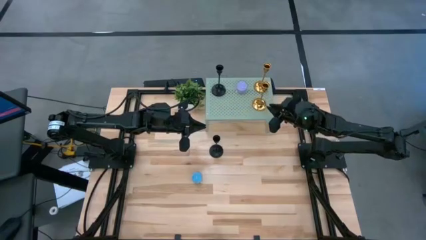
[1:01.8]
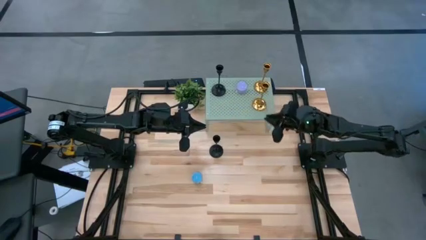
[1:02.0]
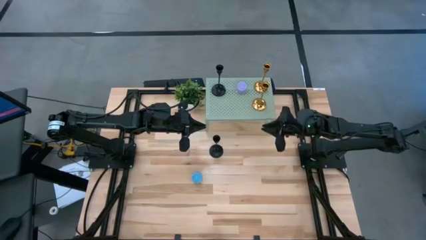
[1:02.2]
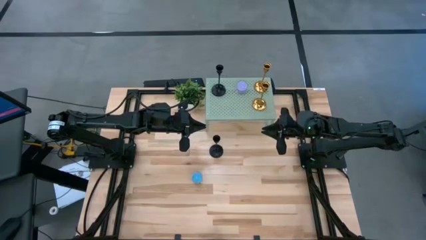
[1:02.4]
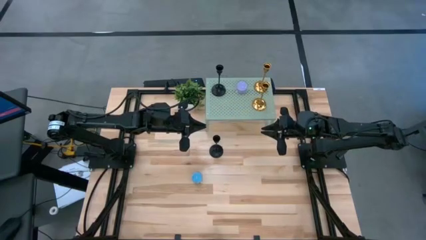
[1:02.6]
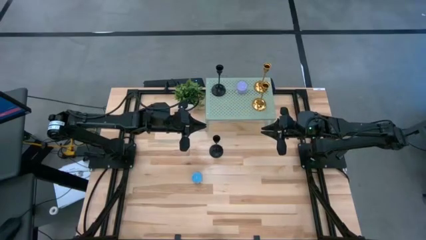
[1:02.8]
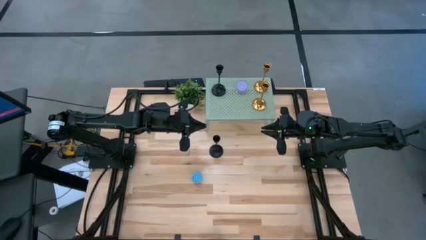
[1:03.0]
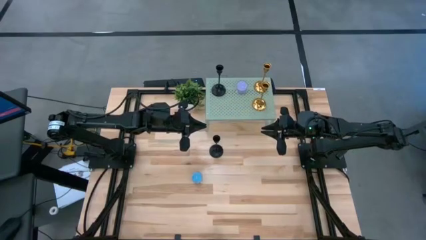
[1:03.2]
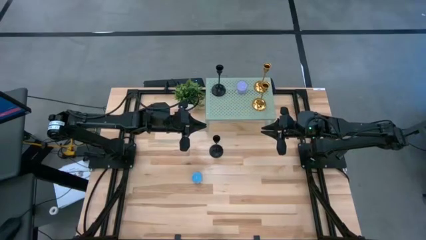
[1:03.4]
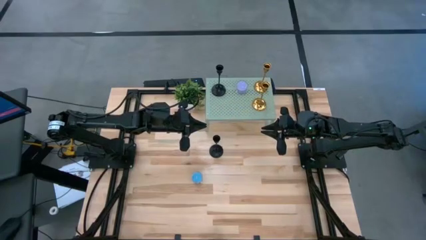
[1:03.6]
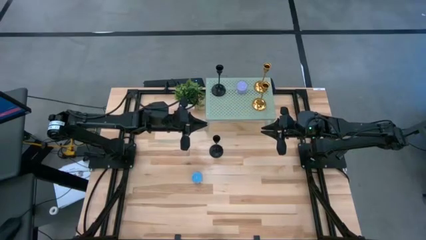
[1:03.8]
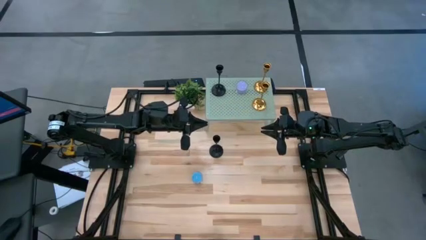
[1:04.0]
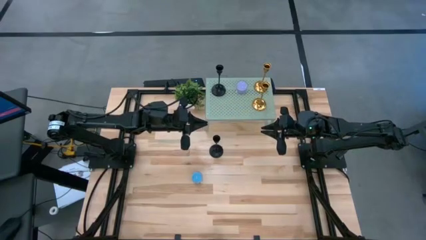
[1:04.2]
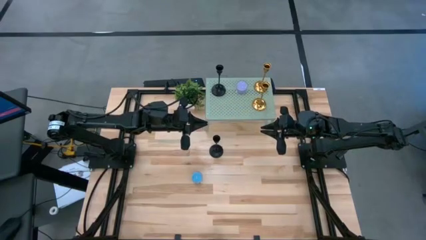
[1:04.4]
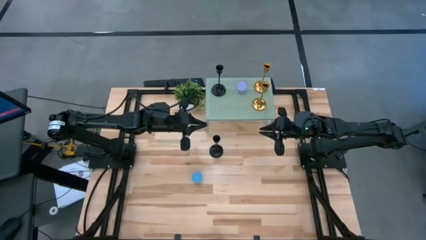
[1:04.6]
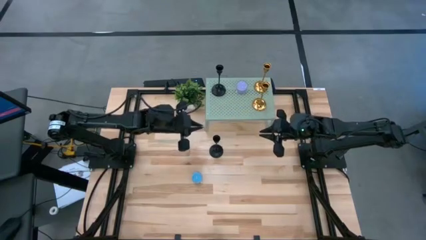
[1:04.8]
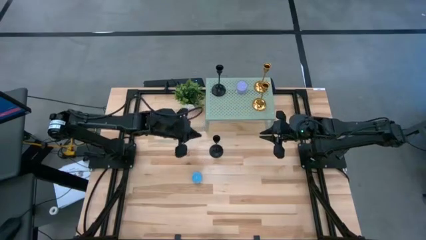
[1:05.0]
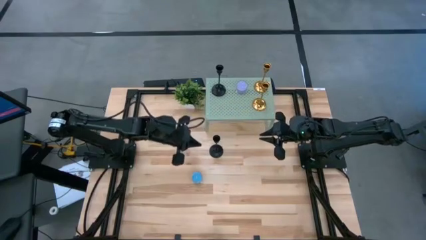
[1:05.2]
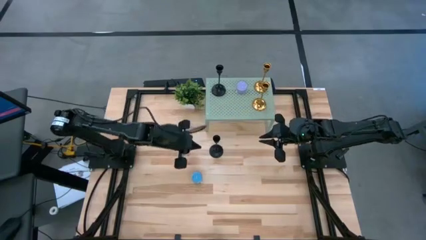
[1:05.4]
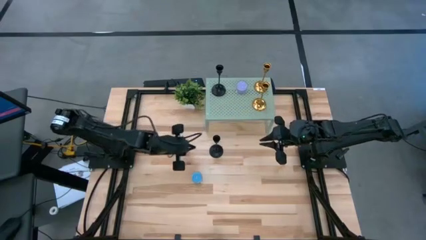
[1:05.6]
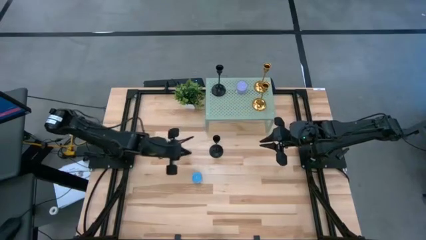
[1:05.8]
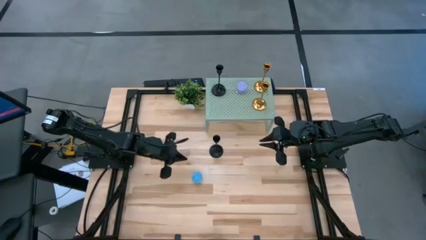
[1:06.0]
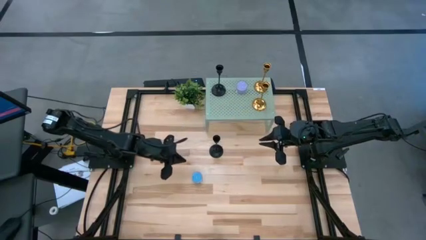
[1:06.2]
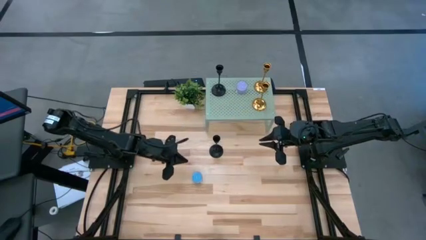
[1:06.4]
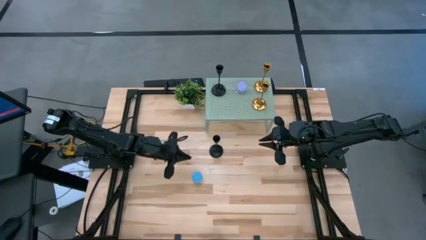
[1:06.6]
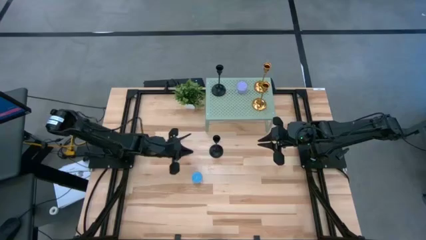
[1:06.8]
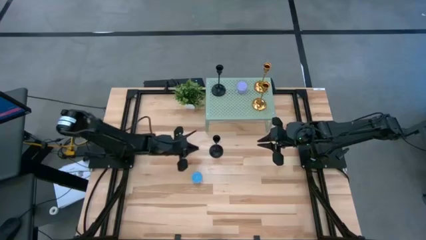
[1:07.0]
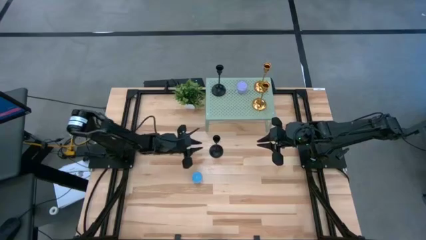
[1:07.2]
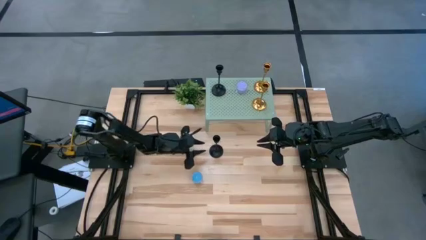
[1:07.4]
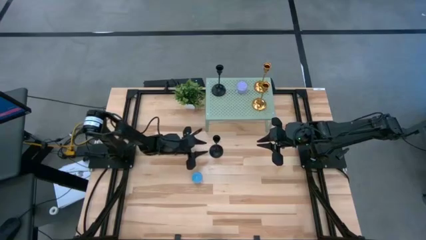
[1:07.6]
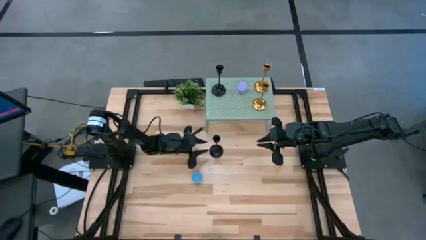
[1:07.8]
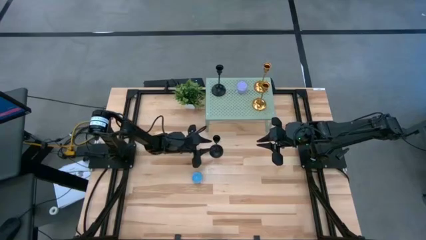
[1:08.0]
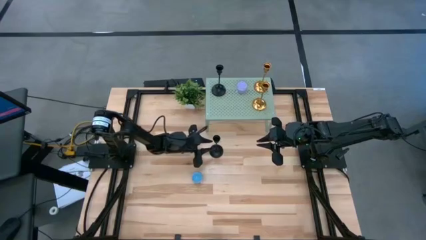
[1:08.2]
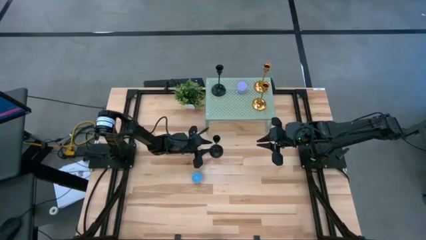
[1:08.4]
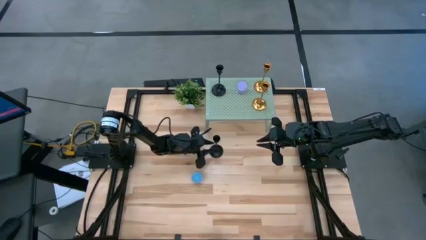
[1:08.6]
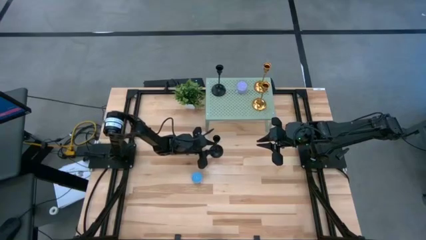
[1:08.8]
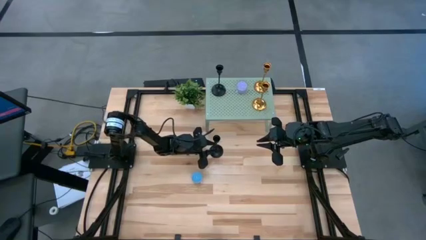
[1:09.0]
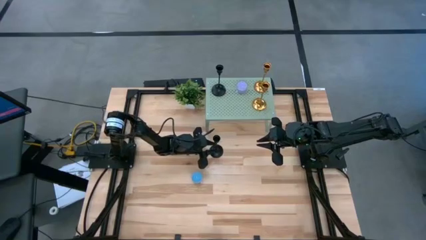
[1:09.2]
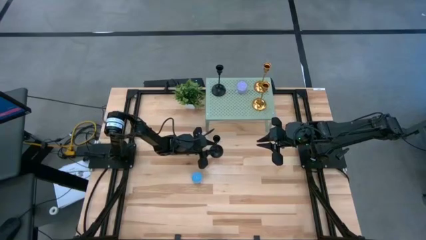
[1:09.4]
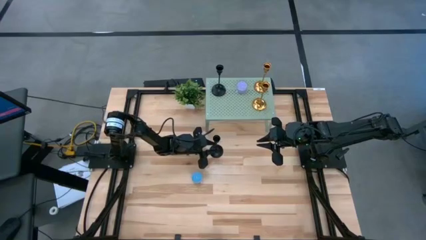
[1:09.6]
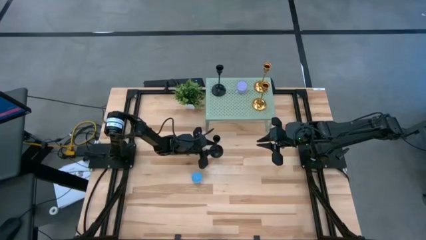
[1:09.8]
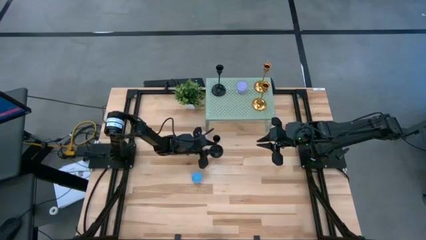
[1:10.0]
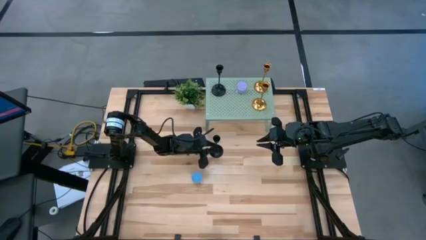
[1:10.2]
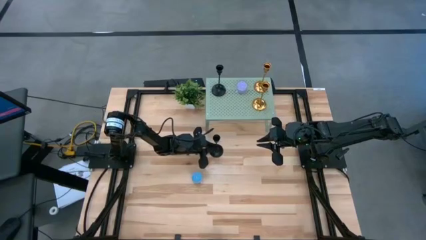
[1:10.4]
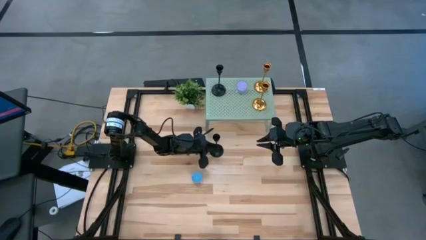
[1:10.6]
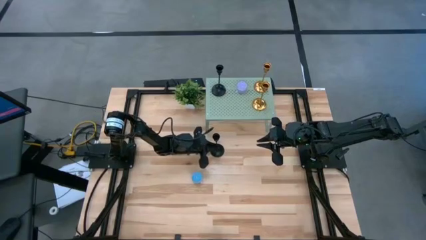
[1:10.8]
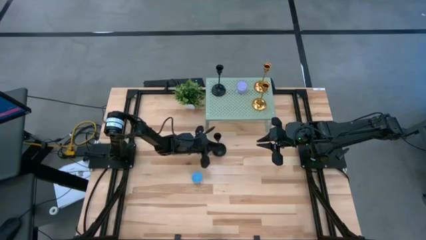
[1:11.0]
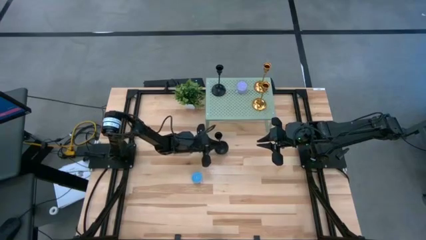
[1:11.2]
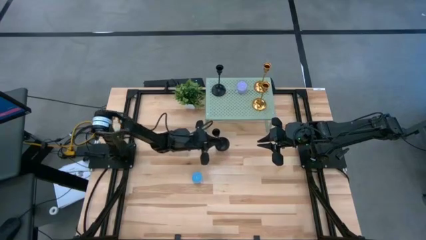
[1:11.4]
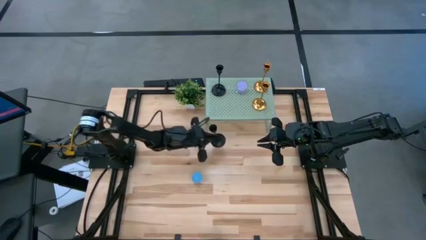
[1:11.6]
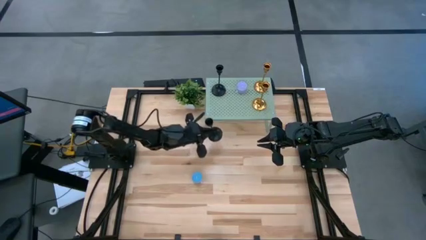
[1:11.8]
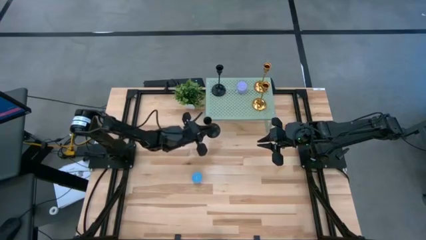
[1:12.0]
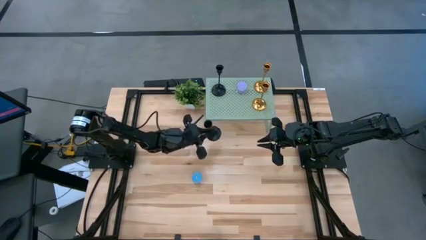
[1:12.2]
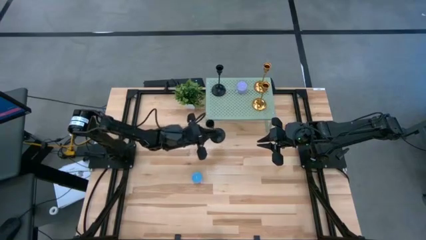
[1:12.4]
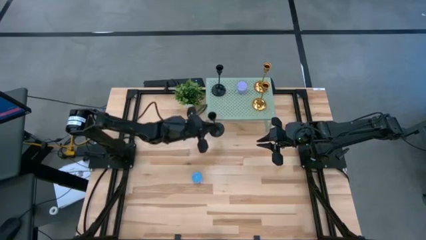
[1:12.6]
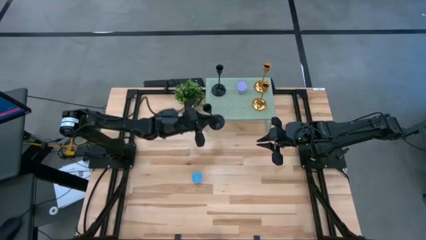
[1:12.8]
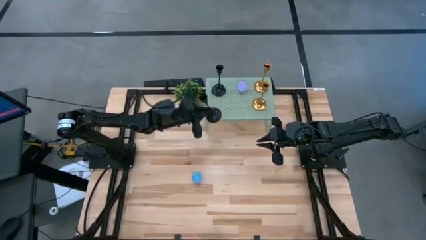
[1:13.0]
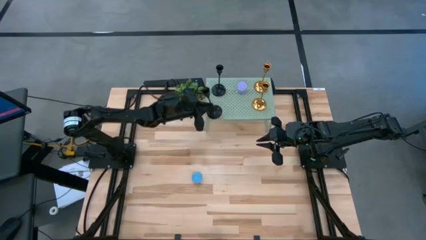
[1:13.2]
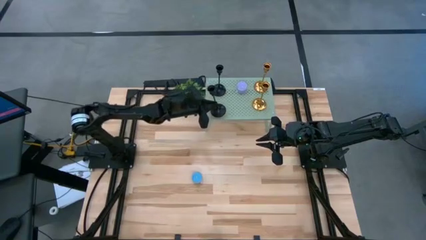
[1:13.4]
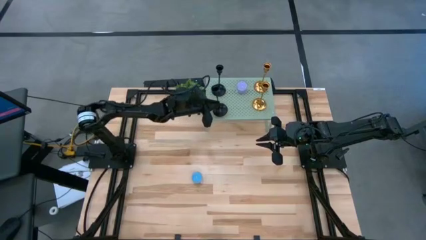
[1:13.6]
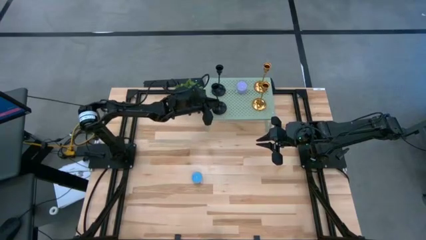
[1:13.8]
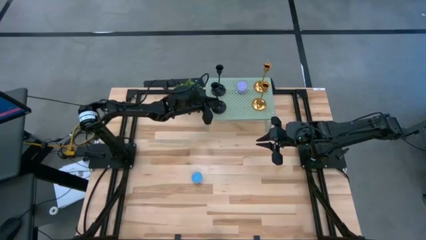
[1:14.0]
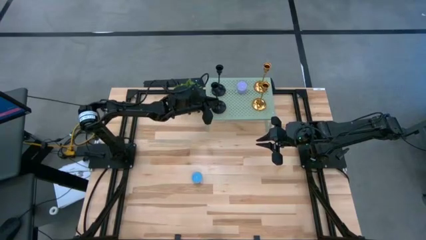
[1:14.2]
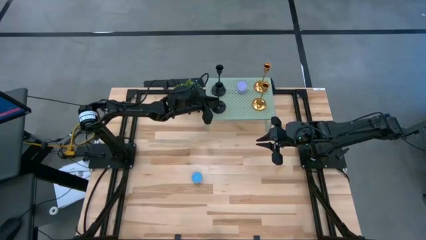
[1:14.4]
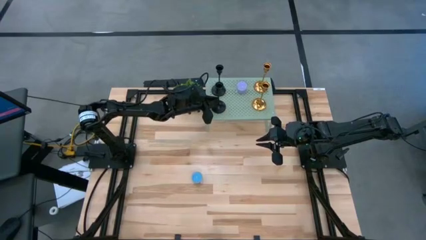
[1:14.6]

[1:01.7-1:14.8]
Task: Pick & Place candle stick holders
Align the black candle holder with the other black candle holder on the shelf

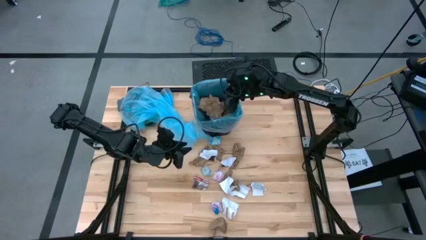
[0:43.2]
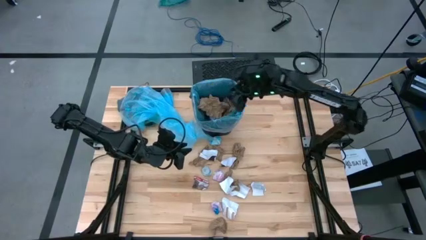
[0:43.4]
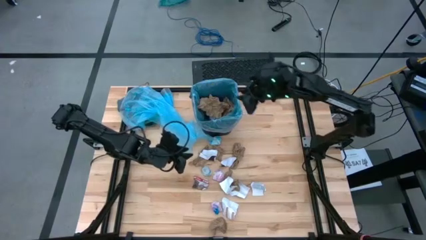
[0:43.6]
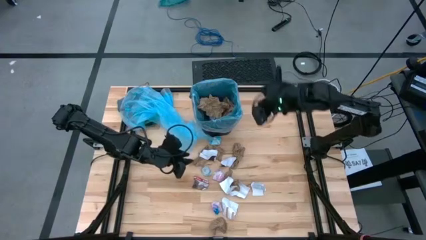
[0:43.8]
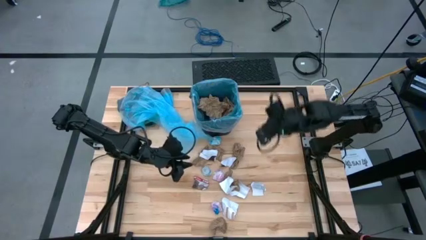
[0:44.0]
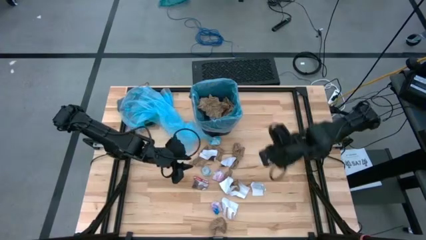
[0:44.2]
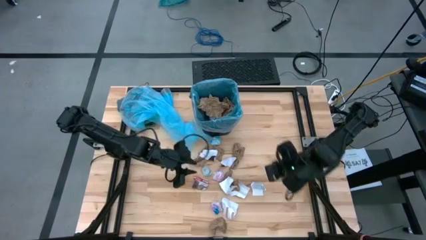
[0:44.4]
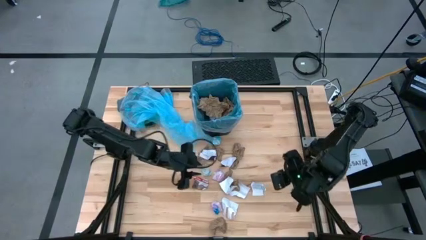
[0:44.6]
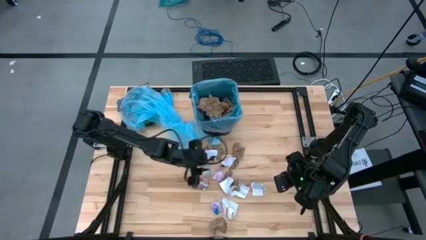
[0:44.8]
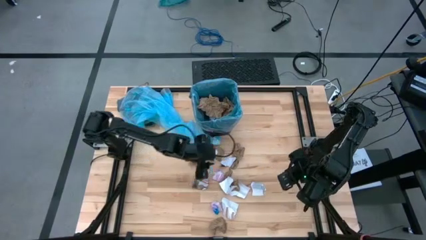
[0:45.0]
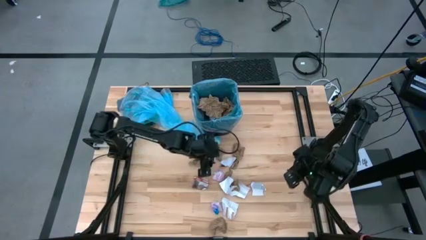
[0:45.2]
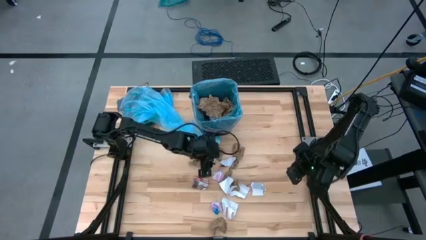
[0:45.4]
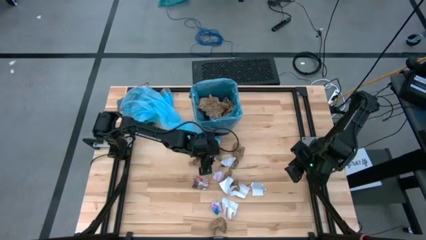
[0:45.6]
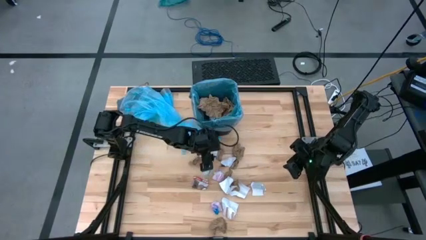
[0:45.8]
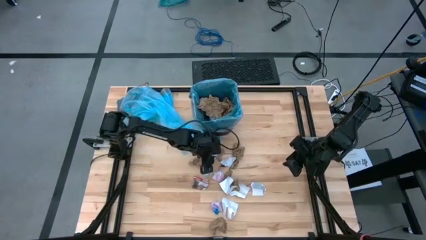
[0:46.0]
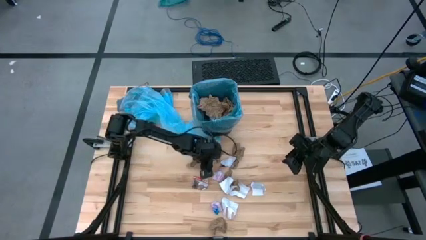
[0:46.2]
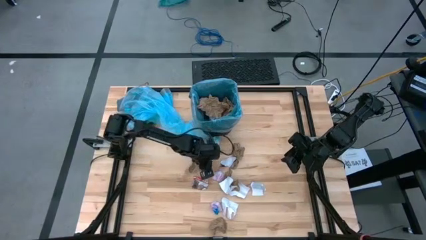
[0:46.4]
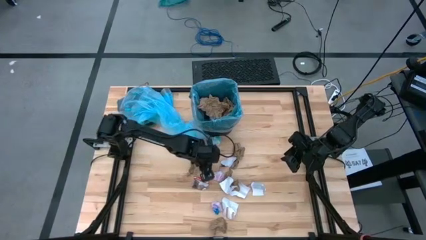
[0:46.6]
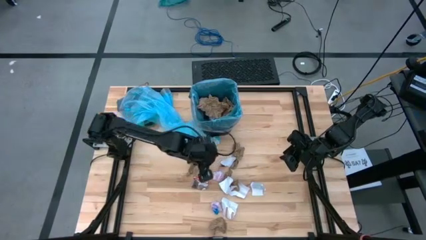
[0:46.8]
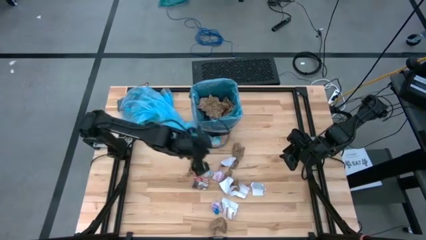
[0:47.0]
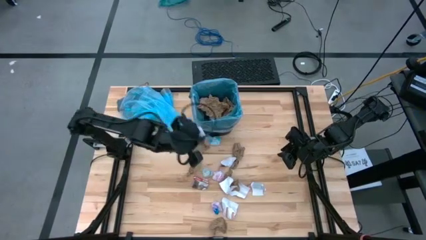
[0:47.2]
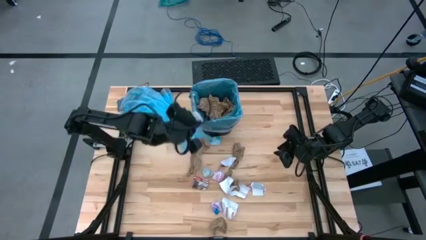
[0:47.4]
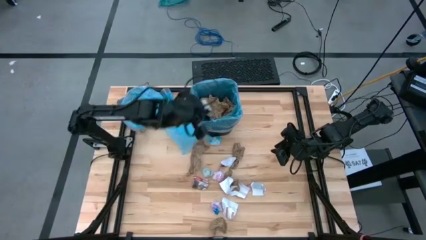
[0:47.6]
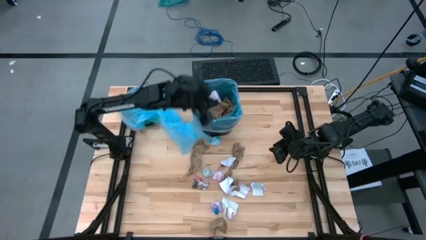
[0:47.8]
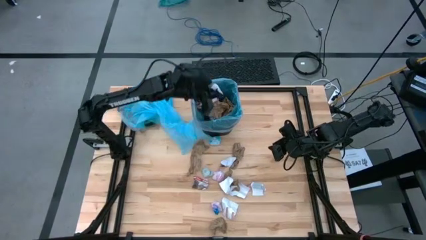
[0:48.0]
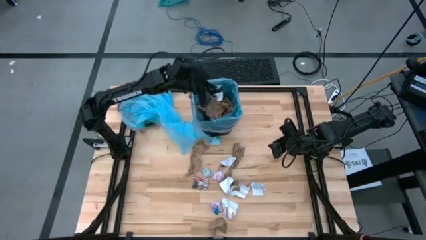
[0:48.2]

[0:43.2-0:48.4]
Task: place trash/remove bag and relplace
Put the white paper into the trash bin
